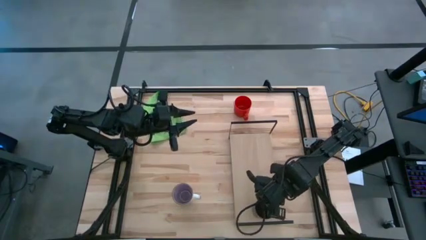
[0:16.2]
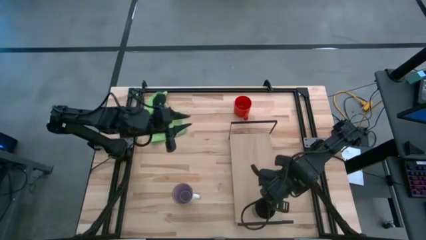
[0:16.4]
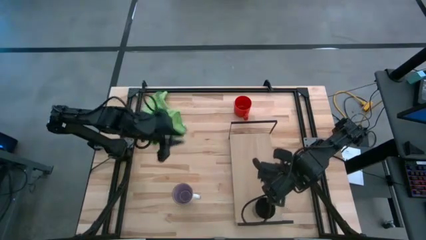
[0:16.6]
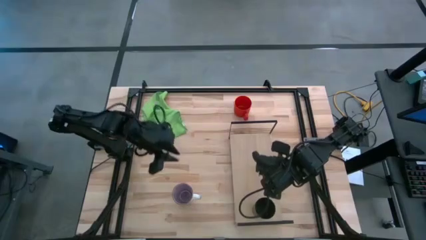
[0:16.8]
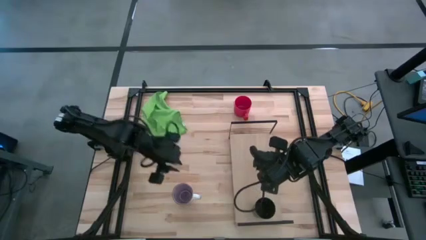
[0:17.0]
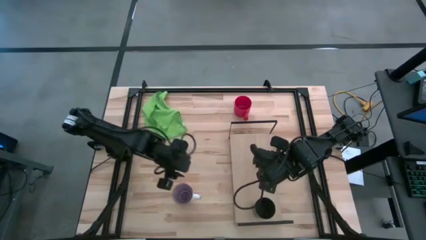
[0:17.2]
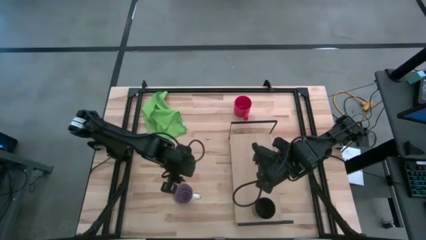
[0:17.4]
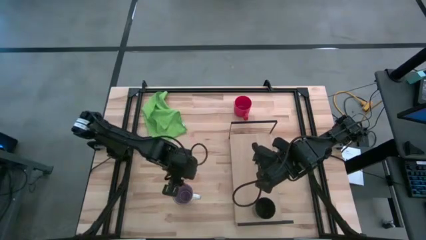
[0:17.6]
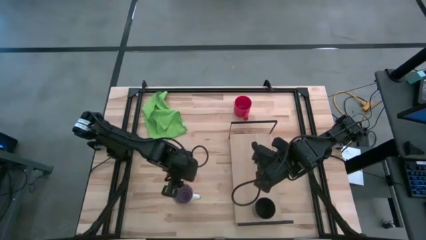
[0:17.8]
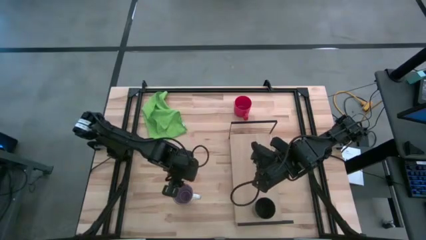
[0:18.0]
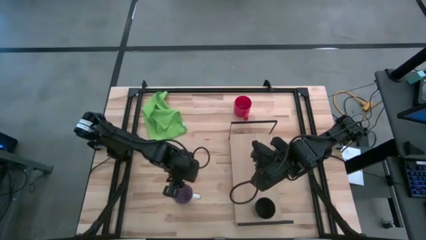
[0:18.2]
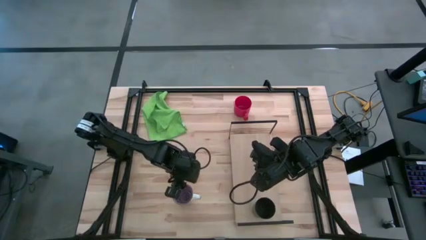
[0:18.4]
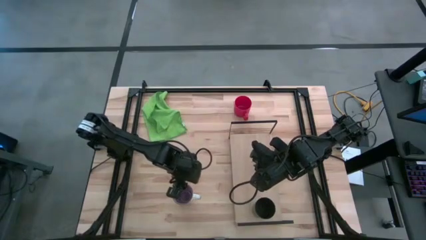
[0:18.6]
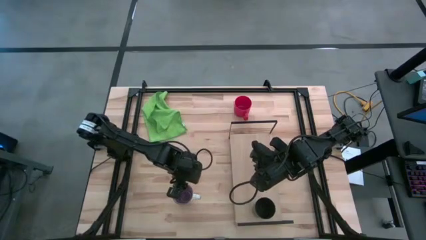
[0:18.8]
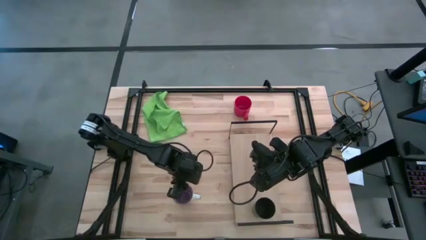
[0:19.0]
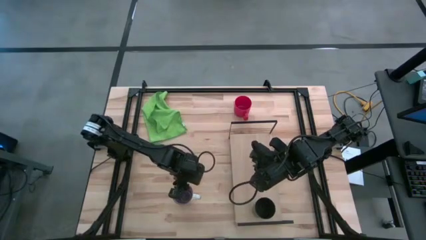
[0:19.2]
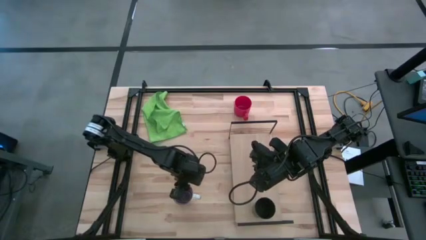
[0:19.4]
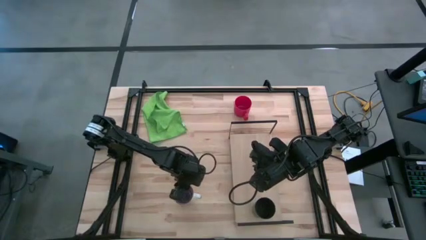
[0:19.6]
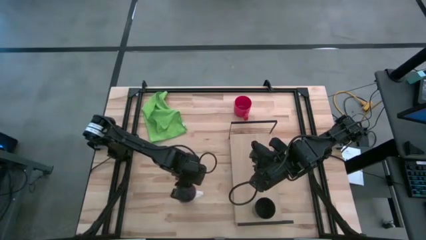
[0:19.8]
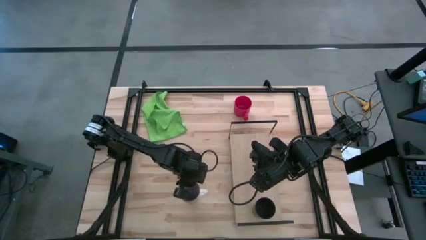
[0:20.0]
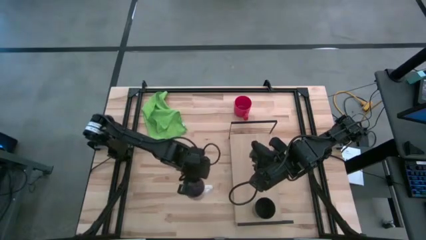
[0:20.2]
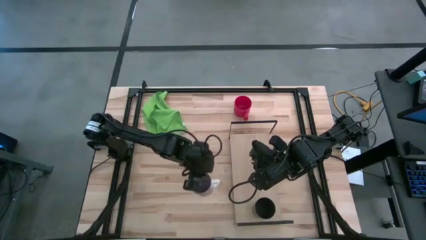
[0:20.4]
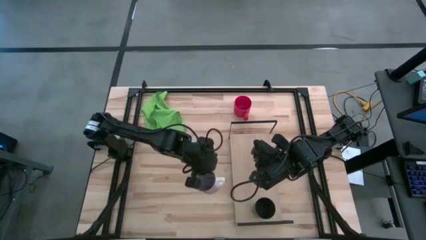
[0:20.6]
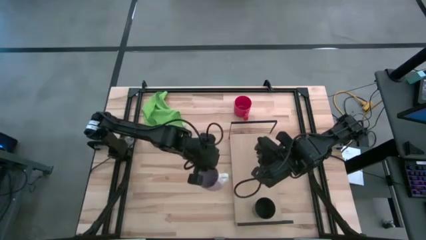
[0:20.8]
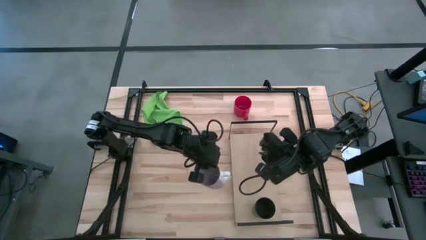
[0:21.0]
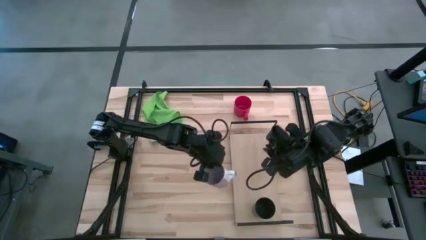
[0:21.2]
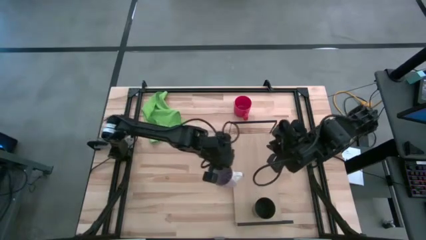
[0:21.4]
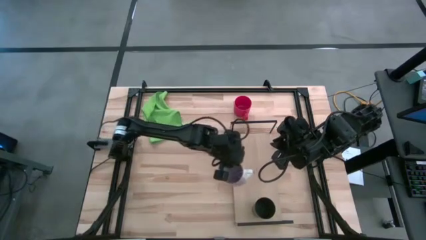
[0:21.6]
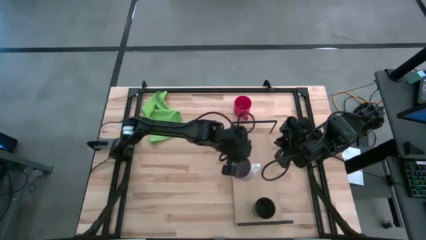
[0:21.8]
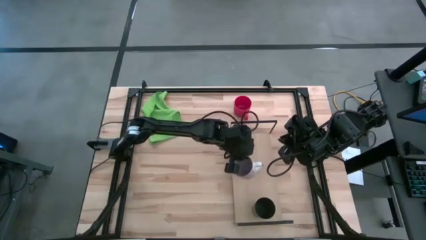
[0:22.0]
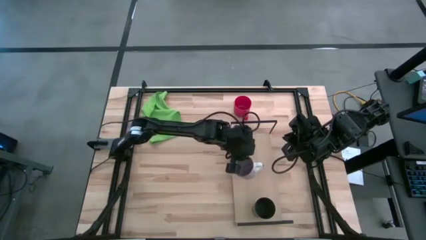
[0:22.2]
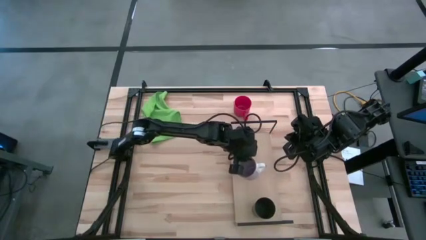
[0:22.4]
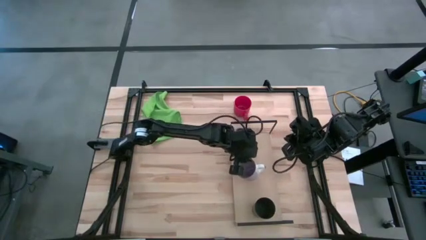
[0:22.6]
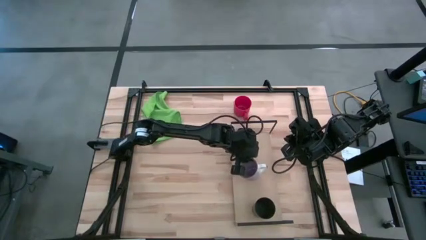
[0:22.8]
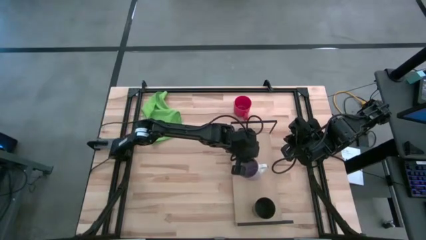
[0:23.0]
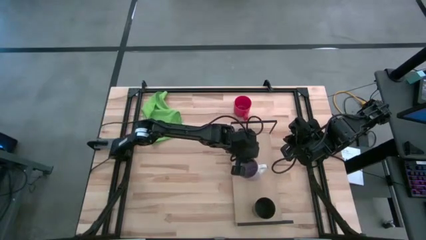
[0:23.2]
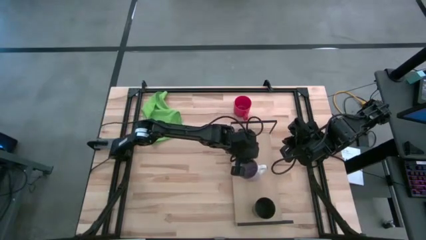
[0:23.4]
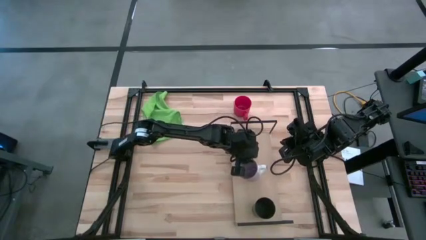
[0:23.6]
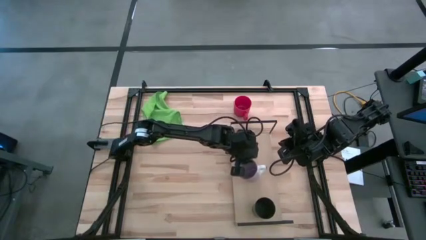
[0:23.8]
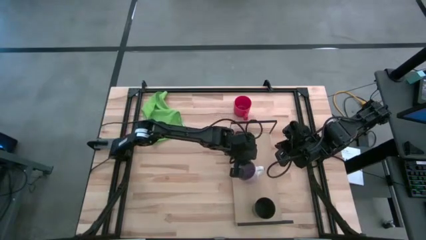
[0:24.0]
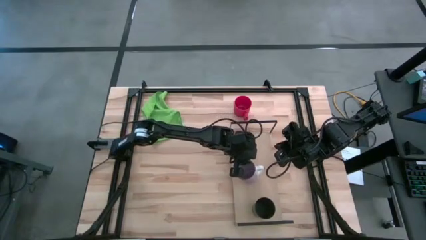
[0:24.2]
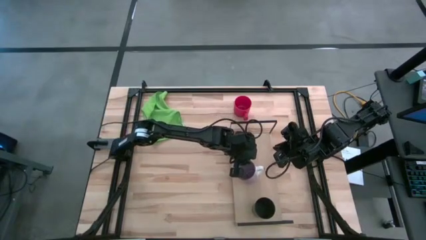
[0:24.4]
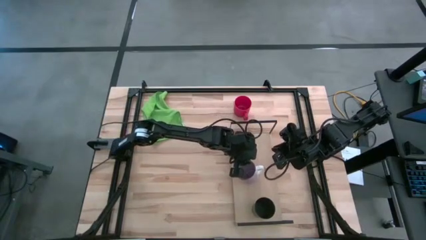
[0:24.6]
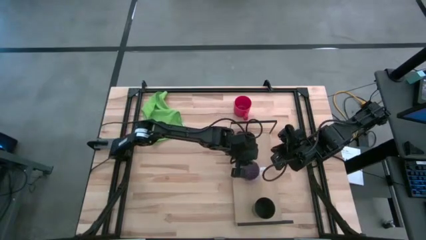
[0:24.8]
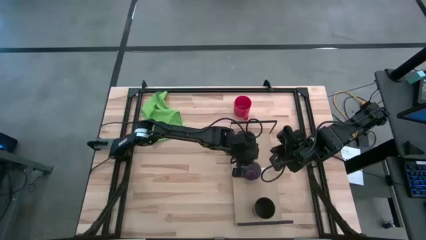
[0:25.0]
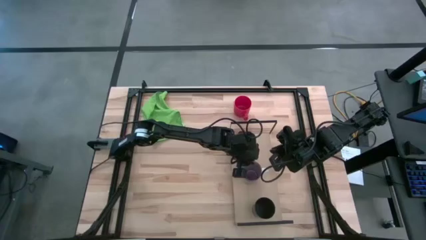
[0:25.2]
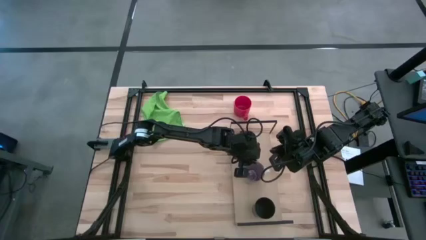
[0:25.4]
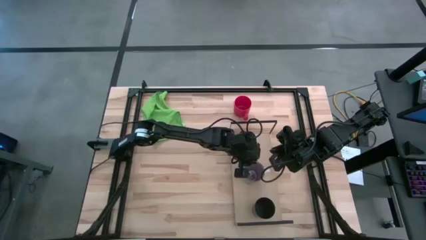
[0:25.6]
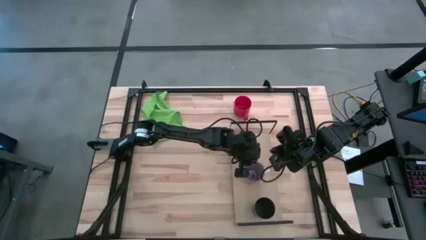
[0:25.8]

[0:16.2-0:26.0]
Task: Stack small to large cups/mugs on shelf
Put the purple mug on the shelf
